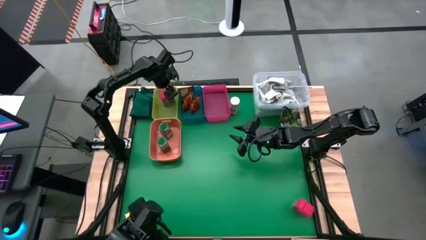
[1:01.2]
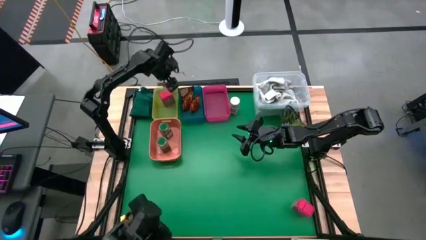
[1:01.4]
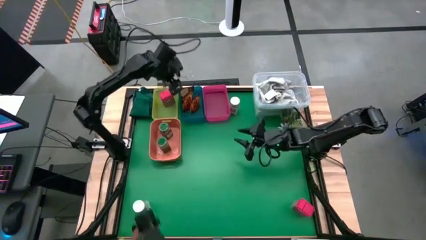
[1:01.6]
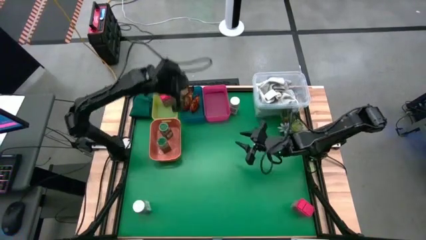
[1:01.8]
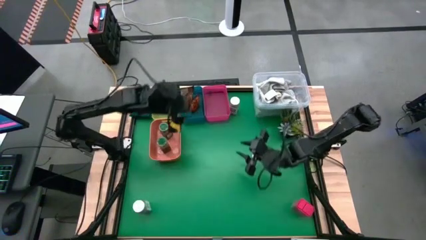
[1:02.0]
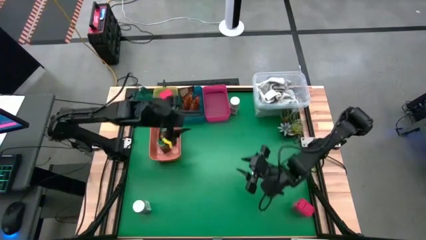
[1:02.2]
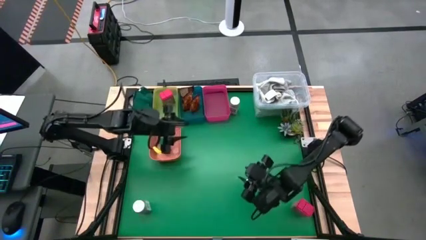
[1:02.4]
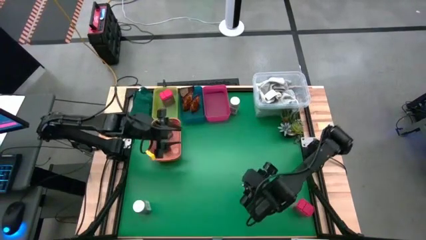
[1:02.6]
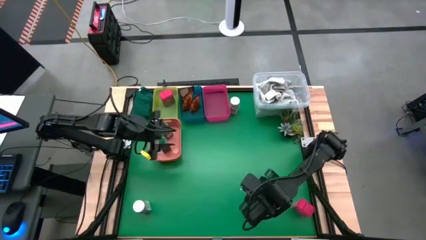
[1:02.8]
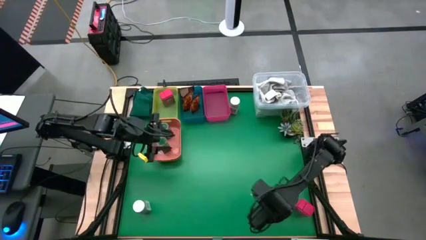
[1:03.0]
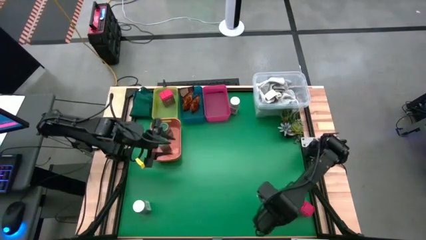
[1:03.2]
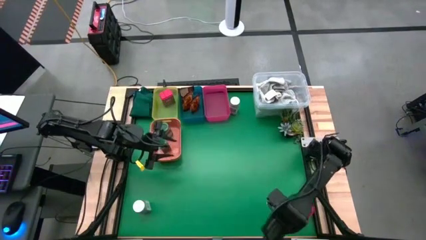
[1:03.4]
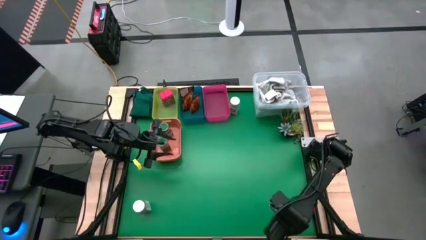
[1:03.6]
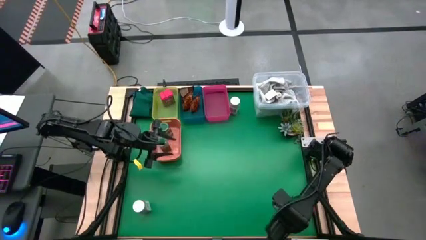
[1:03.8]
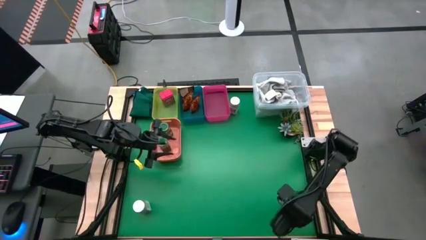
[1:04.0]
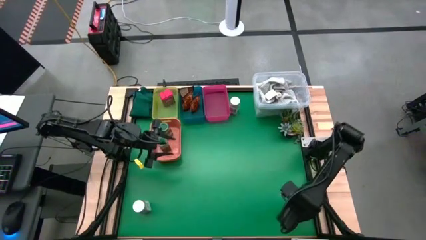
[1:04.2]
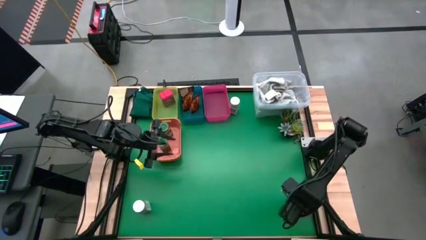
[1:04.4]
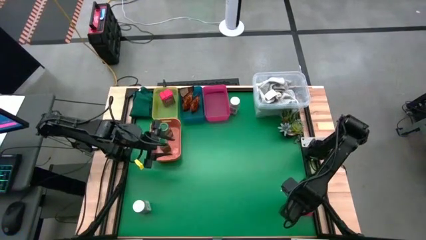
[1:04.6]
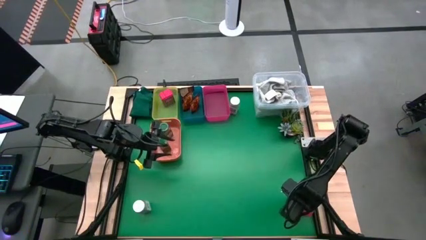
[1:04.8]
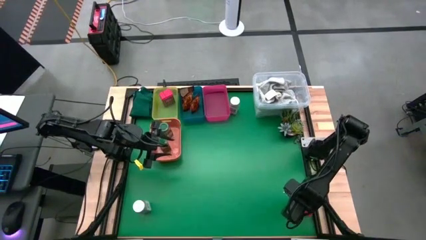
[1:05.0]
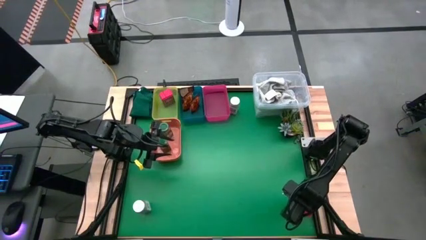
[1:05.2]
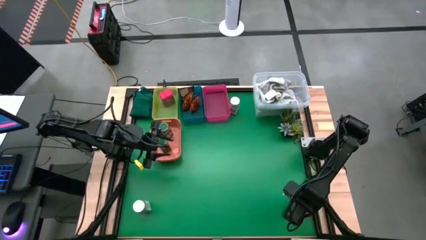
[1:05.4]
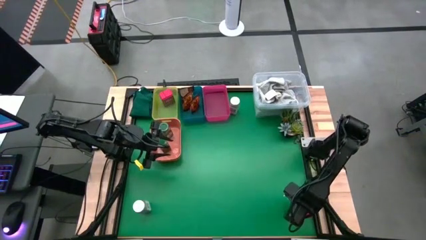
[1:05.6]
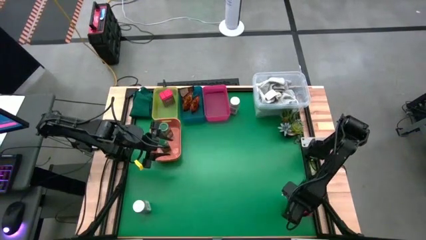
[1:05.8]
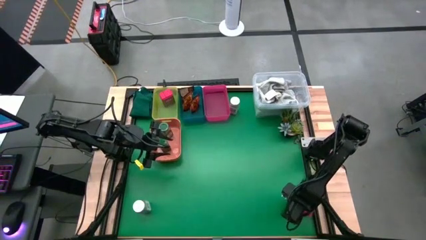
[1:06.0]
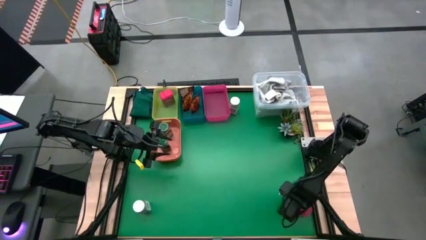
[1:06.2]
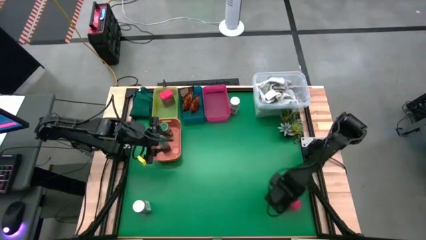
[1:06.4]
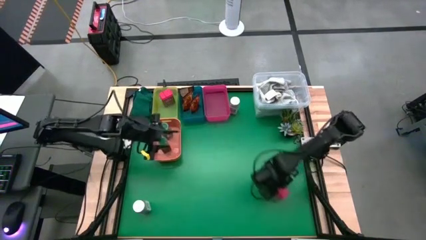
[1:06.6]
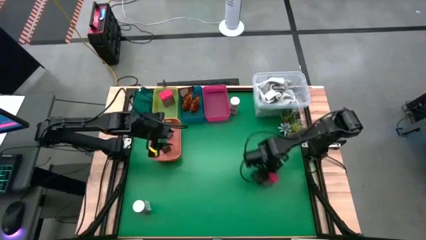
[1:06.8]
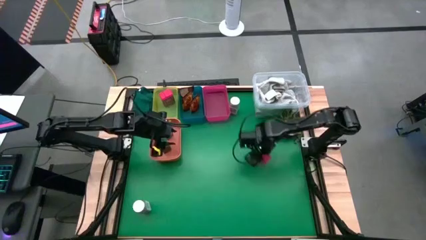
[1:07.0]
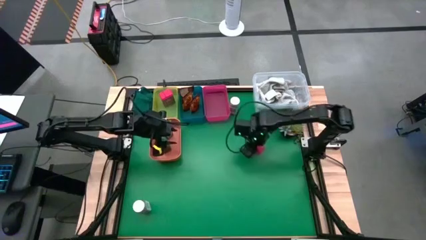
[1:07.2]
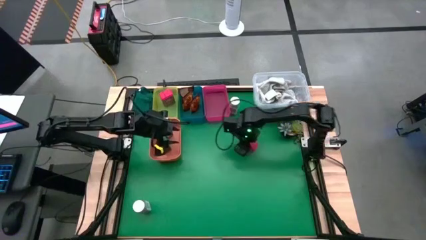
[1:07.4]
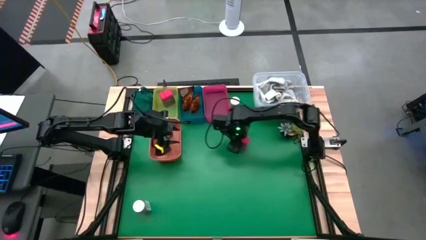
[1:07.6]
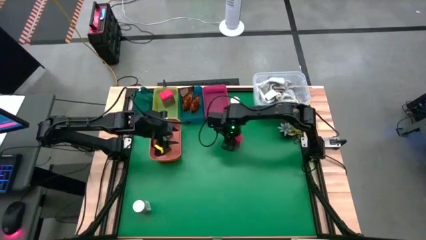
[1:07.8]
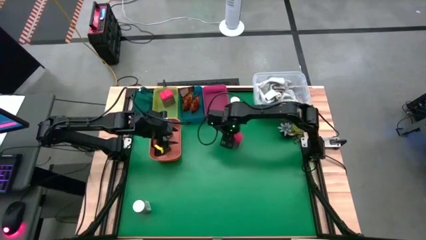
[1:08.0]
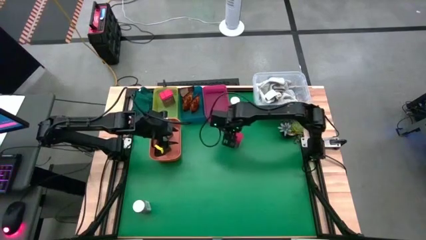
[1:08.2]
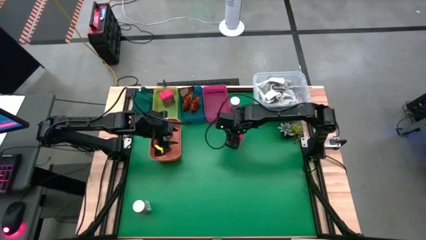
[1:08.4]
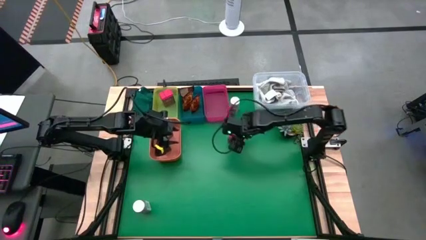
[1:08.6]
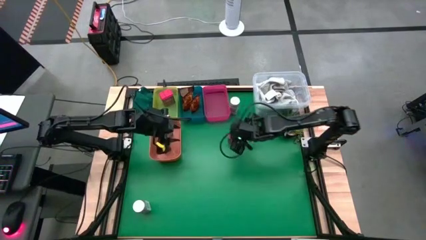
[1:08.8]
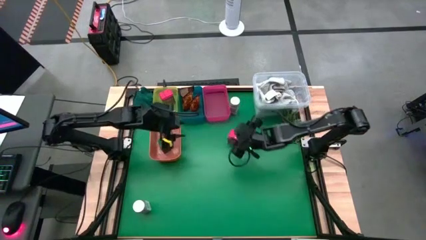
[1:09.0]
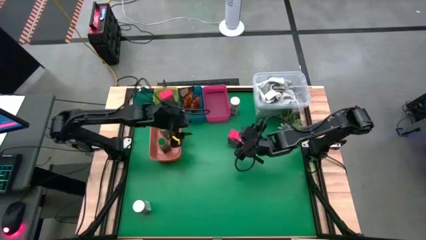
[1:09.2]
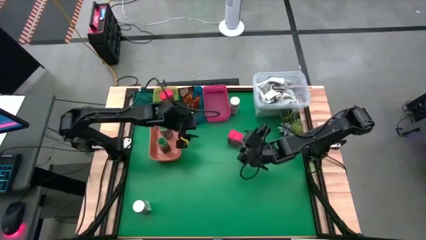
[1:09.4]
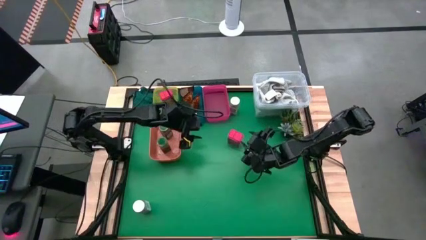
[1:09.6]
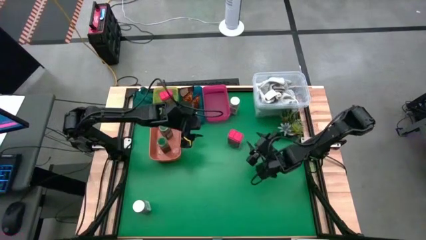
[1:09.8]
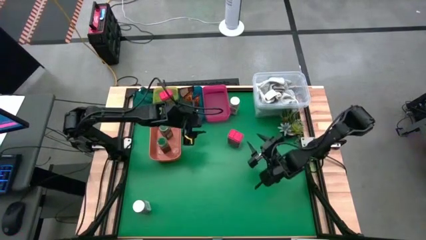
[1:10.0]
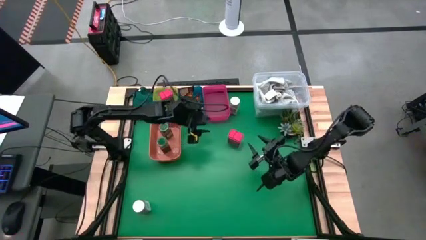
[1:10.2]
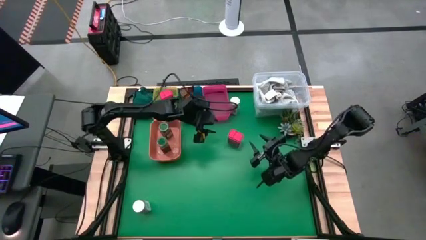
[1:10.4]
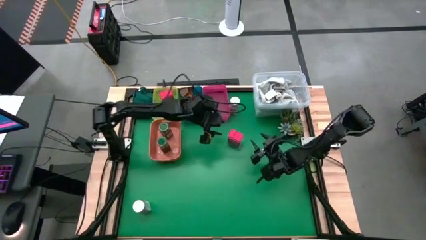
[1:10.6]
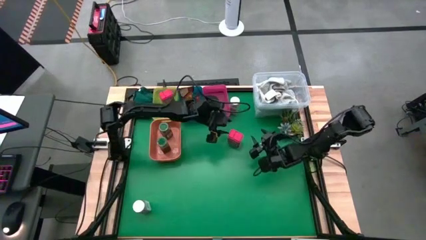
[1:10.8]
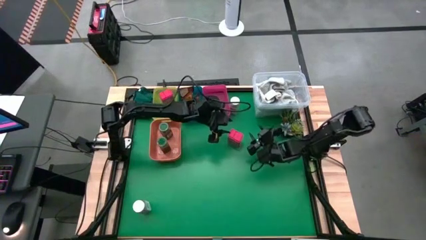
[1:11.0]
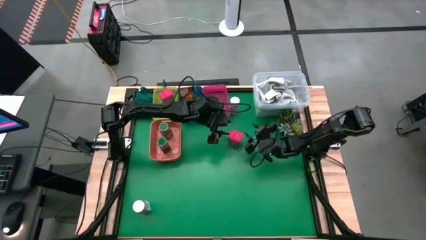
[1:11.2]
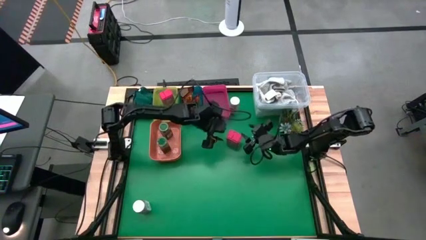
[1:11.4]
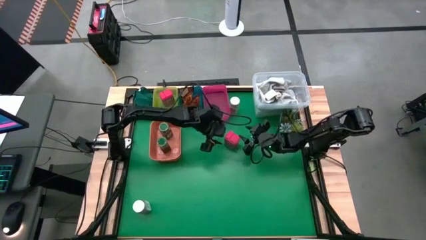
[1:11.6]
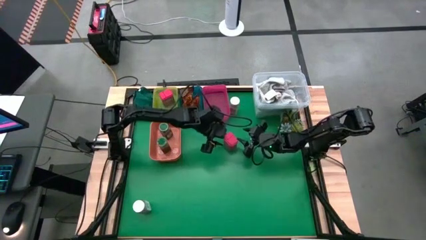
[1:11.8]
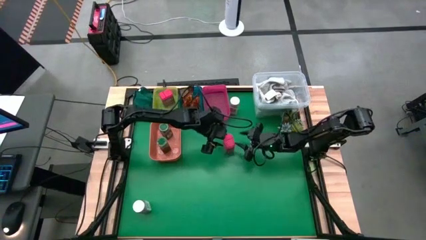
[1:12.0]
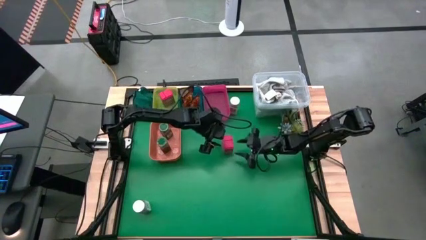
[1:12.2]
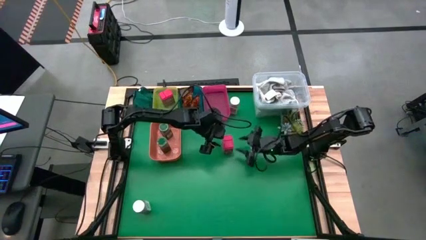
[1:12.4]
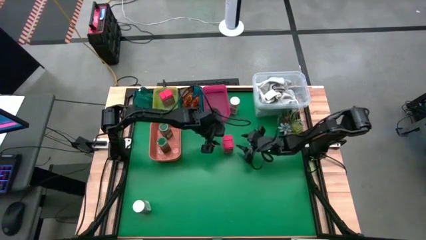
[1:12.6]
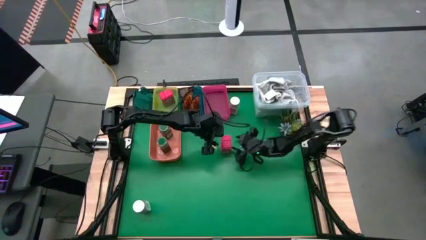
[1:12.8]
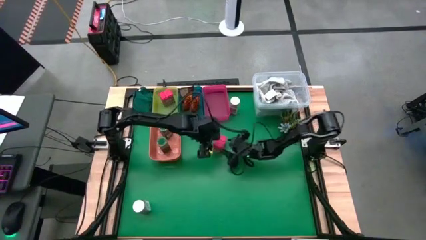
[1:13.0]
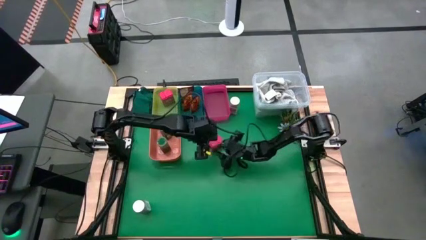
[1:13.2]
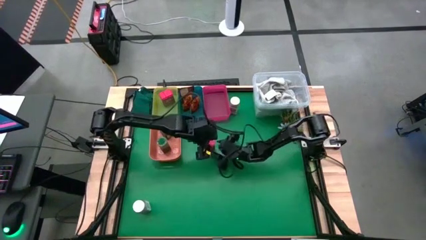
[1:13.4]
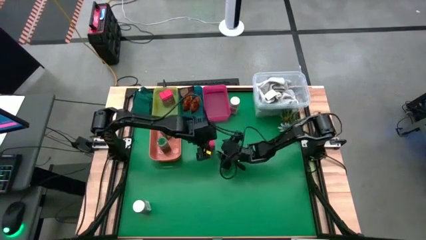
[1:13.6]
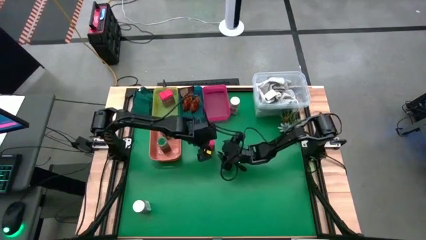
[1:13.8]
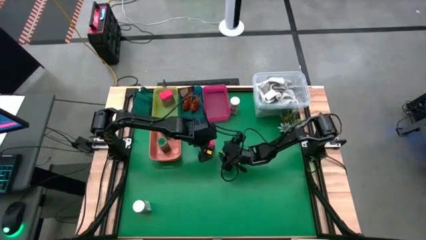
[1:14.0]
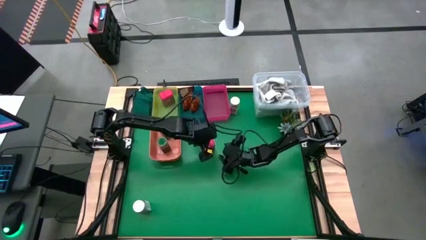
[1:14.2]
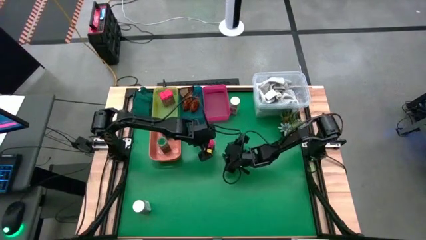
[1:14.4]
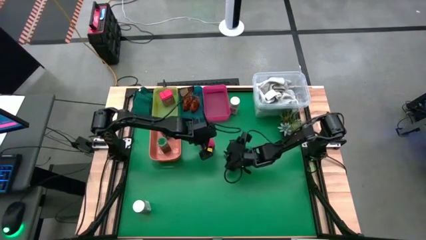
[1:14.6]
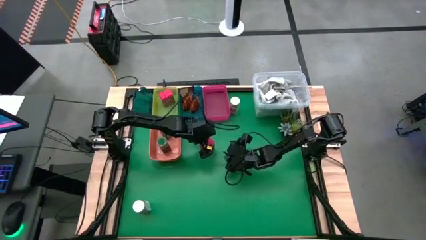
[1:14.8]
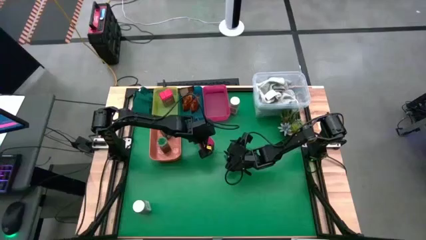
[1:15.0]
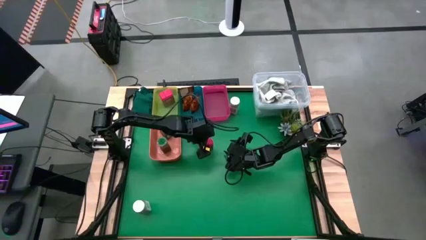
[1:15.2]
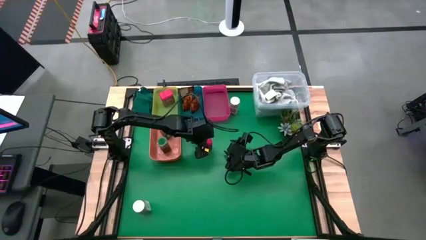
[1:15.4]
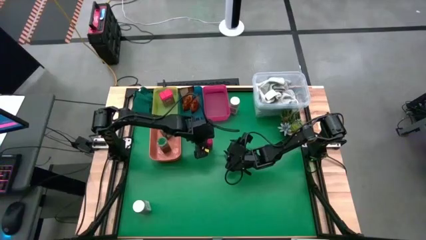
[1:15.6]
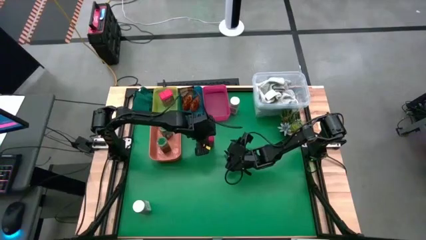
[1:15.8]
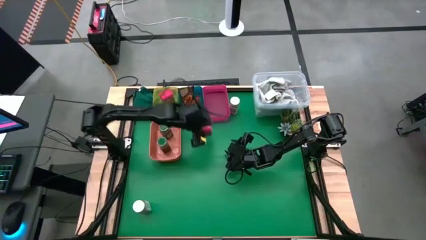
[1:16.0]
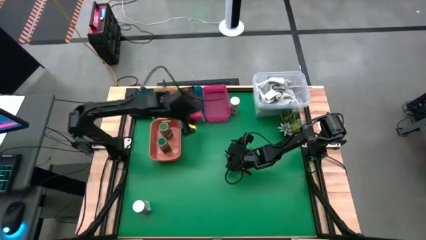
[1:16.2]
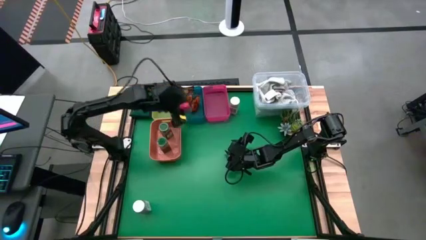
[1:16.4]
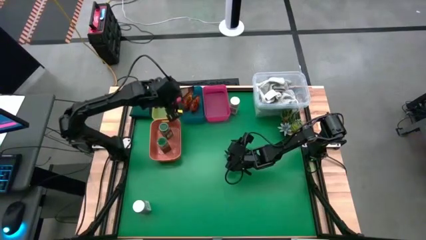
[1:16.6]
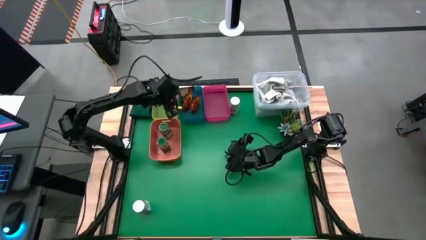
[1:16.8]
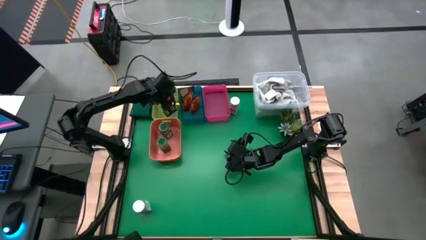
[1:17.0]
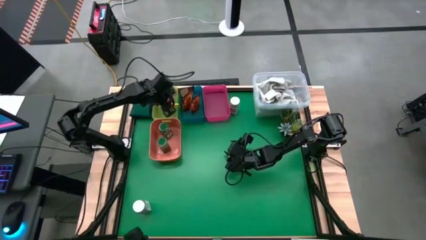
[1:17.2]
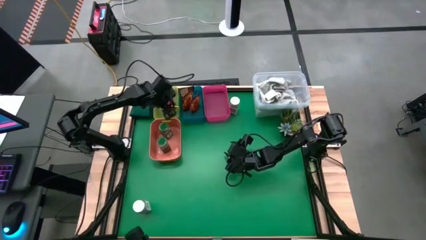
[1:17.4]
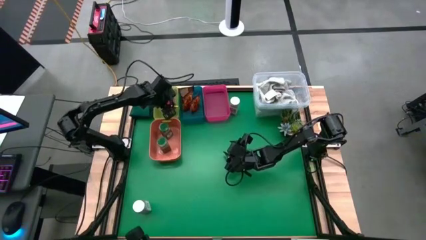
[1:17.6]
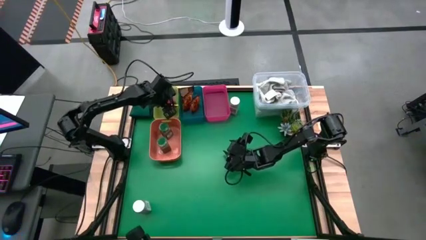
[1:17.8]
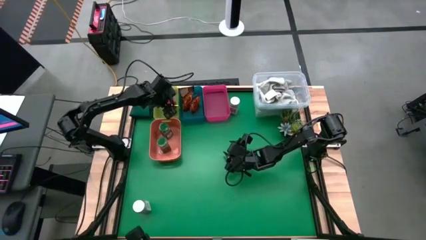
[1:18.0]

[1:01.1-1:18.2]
Task: Sort spices by type
Put the red seasoning can into the green bin
